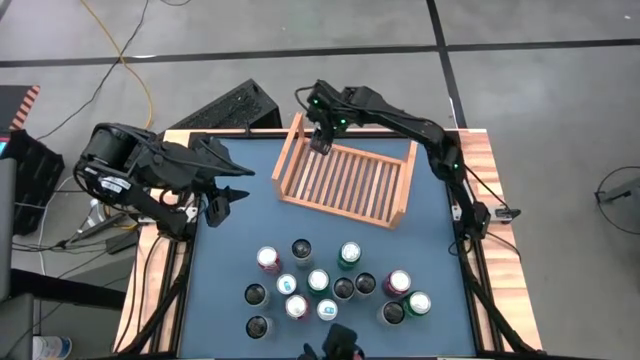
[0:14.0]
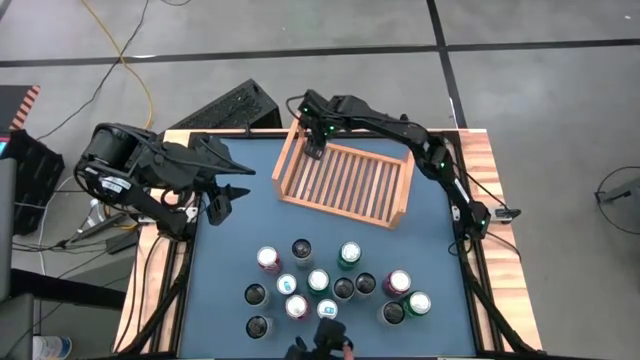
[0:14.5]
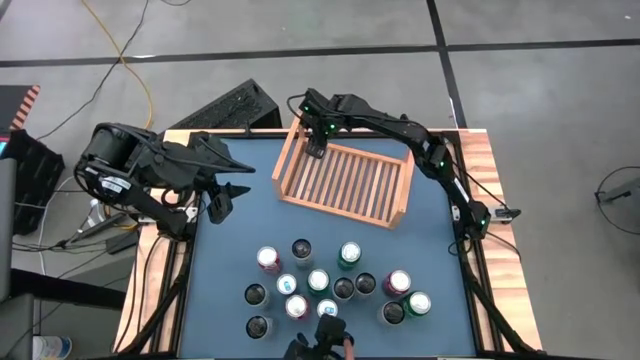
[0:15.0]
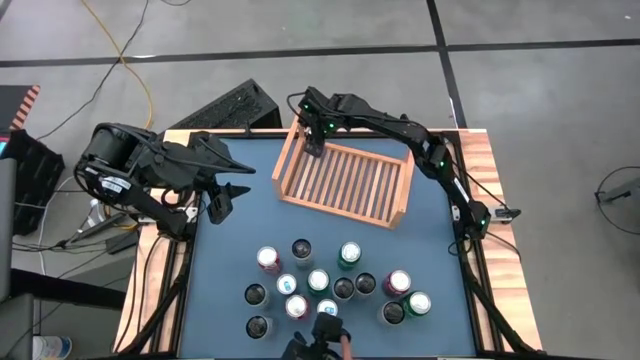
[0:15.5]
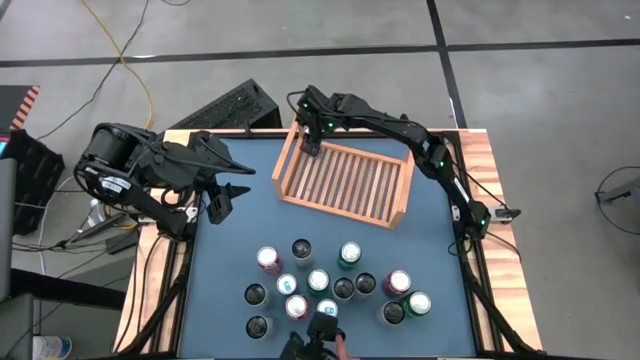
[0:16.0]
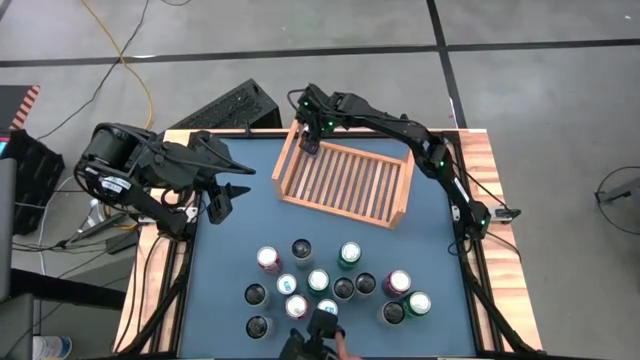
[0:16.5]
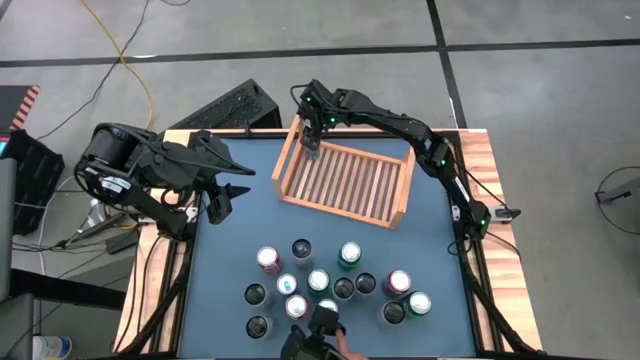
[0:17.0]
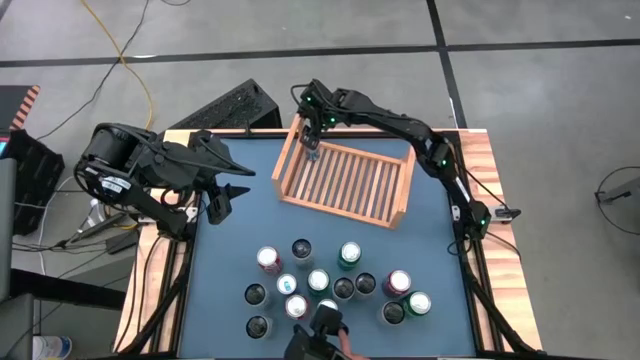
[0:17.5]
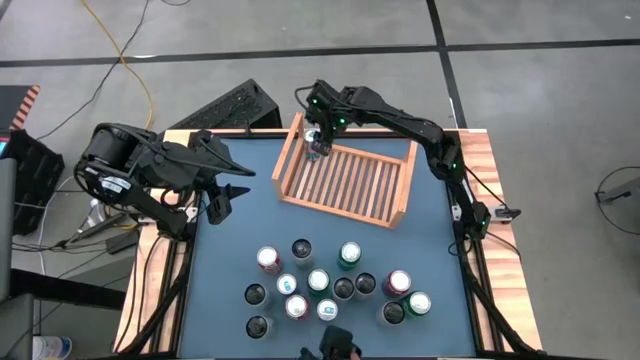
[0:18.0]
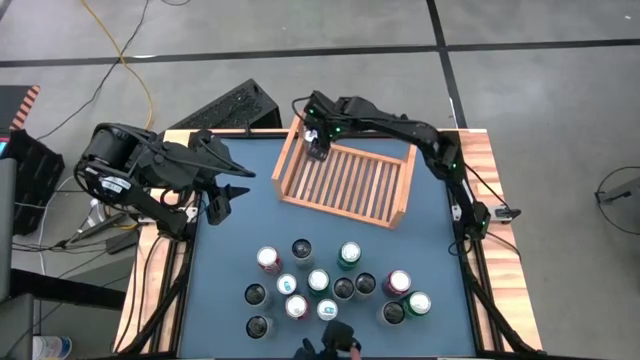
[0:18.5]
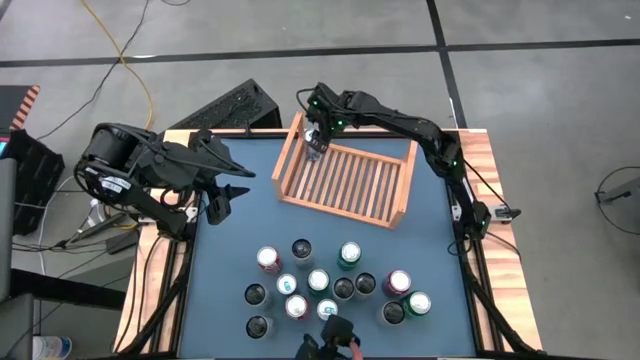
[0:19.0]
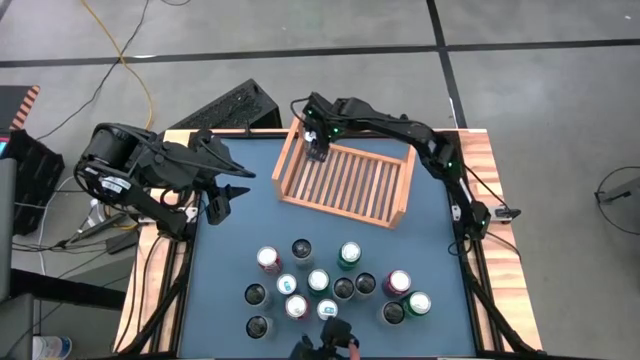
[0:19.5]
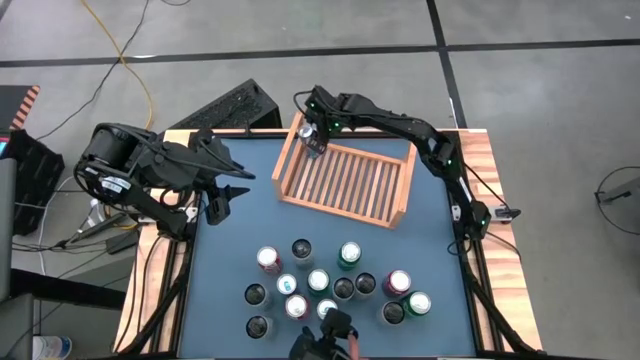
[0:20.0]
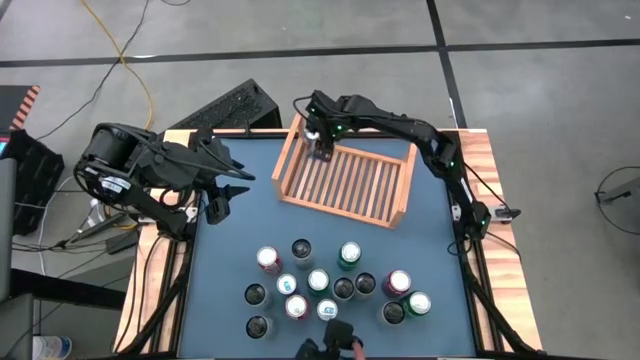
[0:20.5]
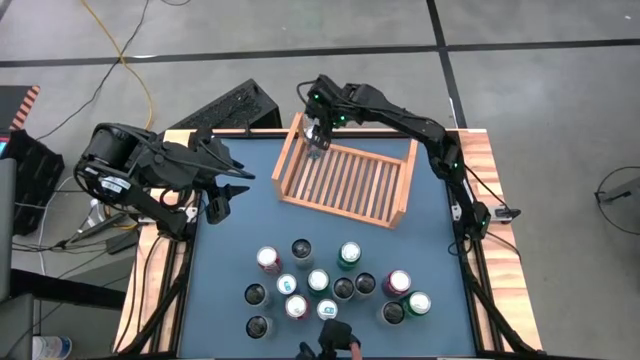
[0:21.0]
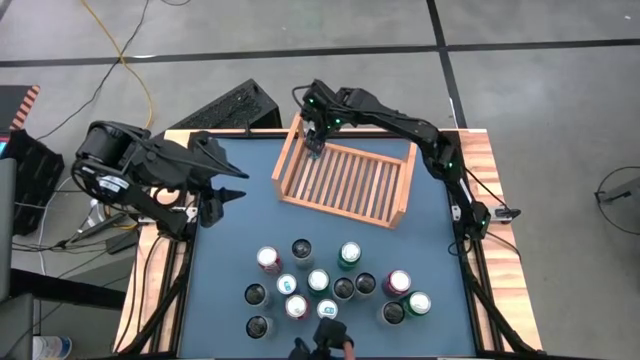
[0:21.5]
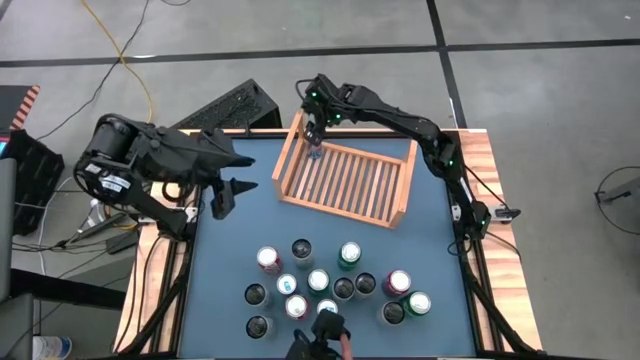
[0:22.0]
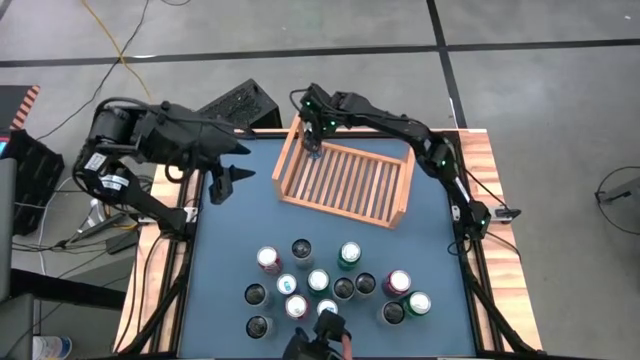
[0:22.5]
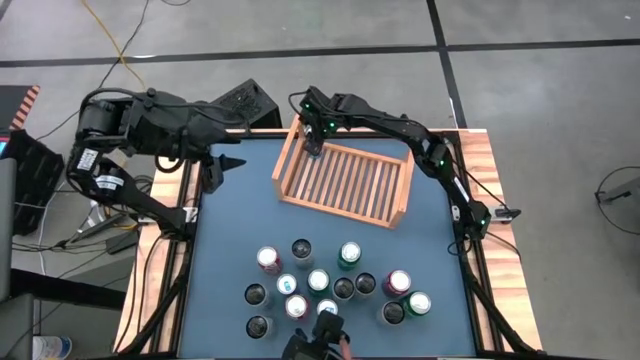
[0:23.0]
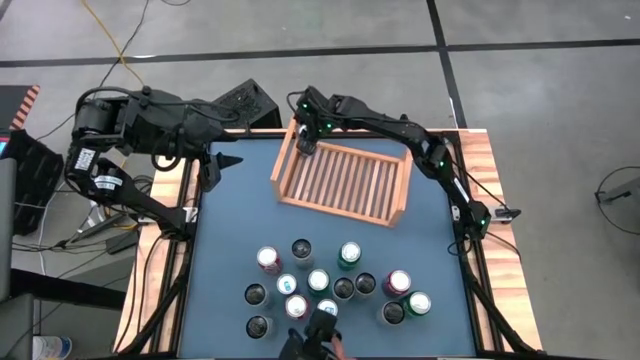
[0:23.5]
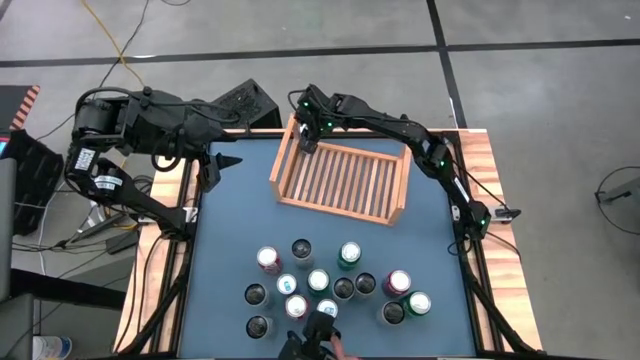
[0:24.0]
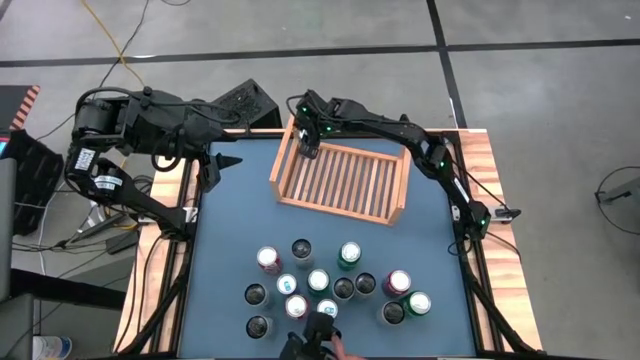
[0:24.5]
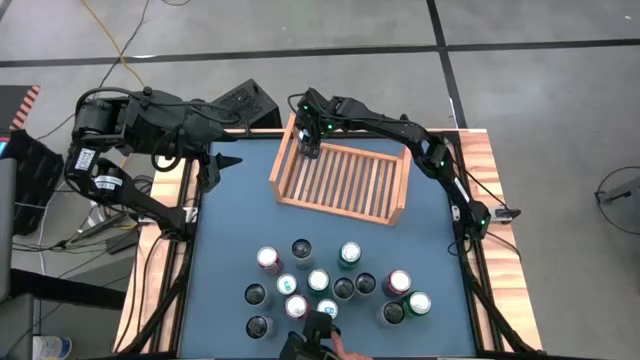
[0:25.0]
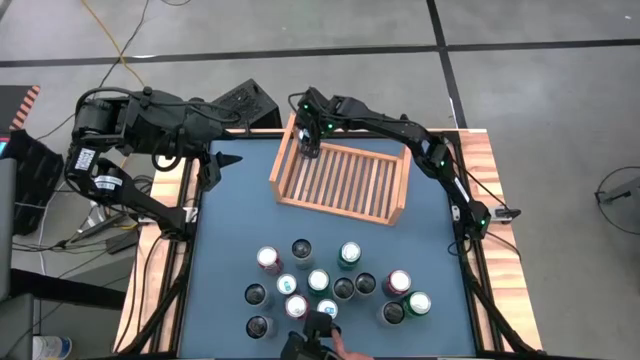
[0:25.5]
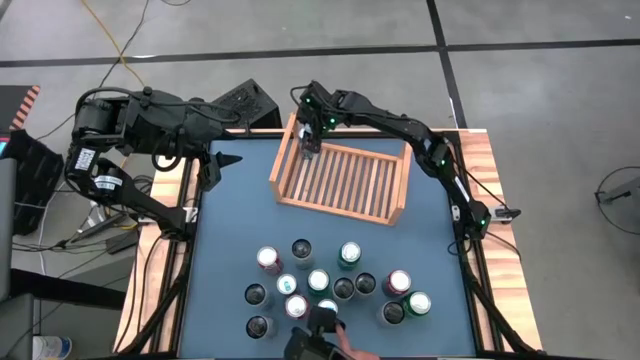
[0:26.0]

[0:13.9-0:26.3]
Task: Place canned beverage on shelf
Put the blue soda can on the shelf

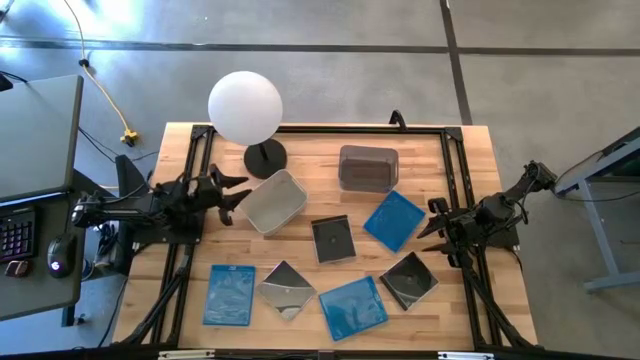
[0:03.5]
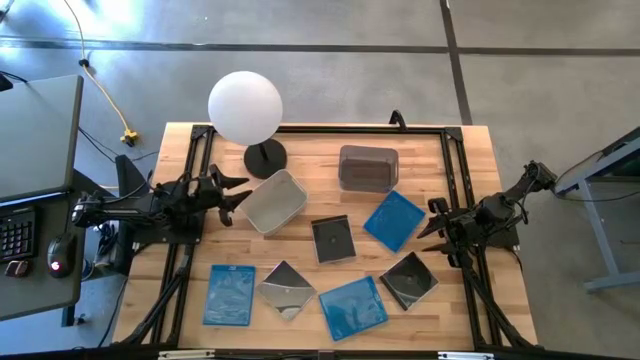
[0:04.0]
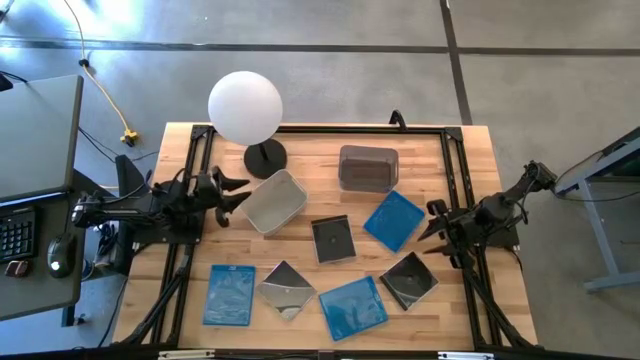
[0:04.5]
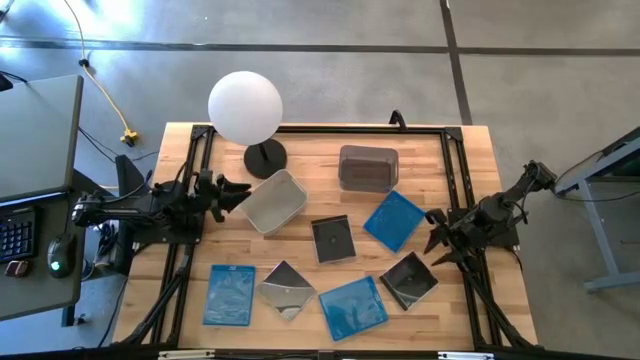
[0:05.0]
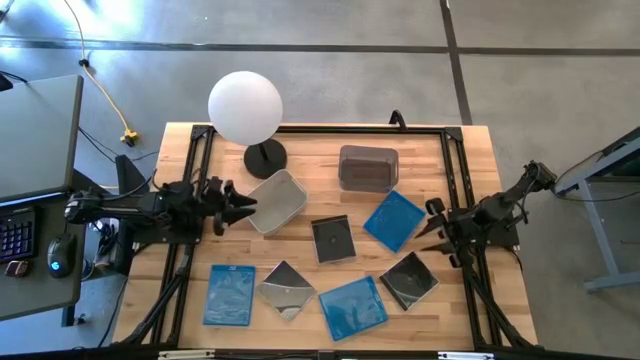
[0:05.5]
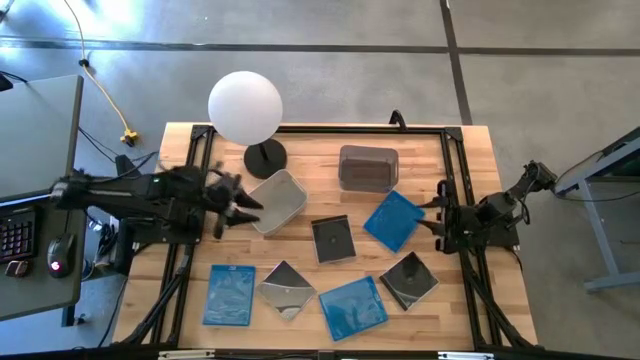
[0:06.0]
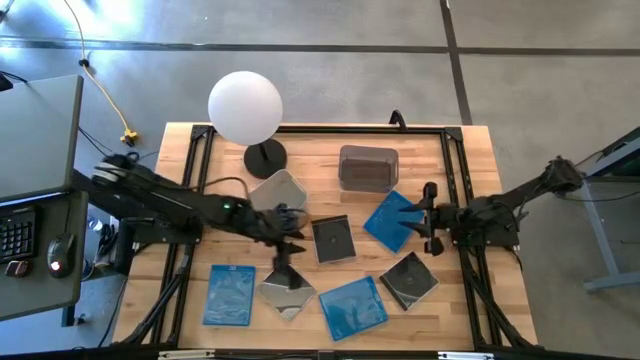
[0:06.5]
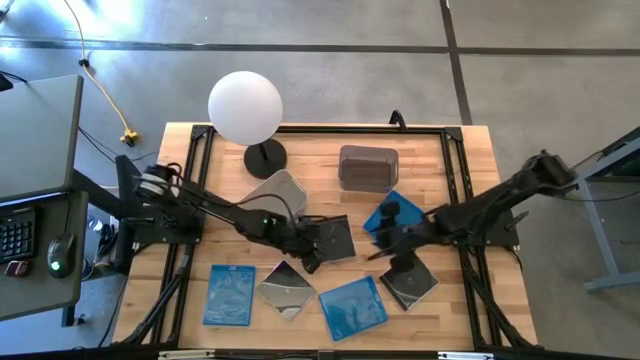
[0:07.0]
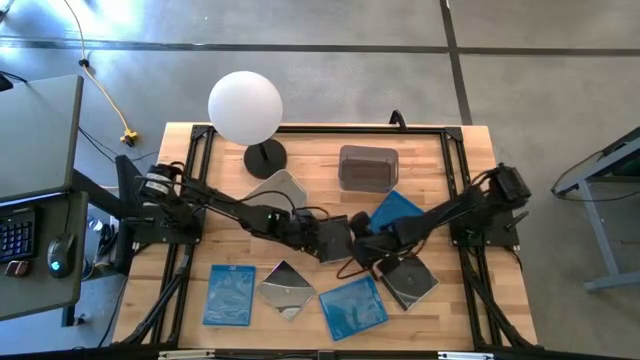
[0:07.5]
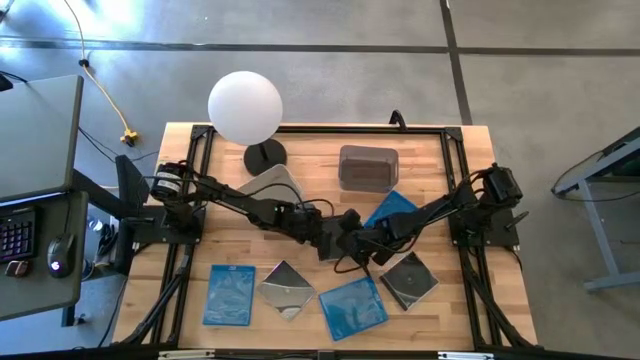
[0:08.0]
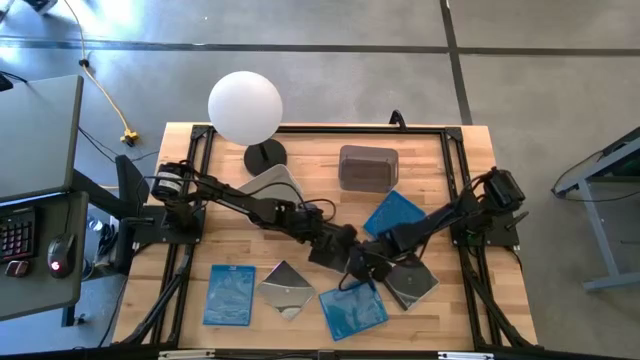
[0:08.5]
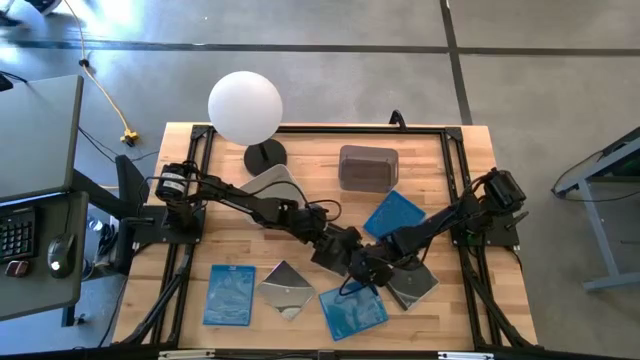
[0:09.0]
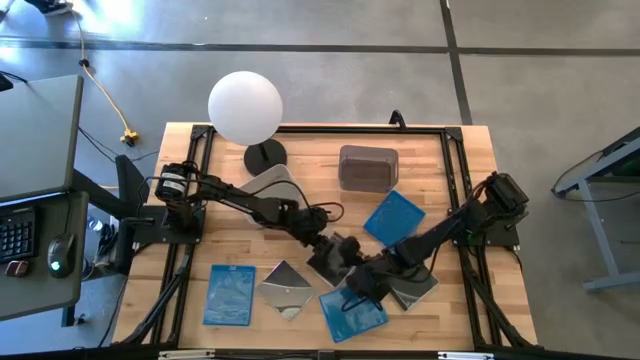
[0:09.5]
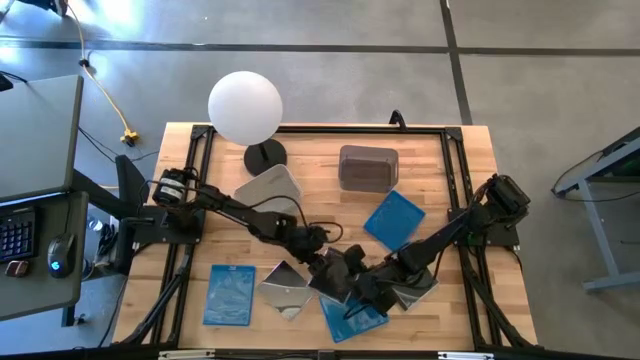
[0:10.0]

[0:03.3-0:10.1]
Task: Pick & place jewel cases by type
Put the top black CD case into the gray bin
